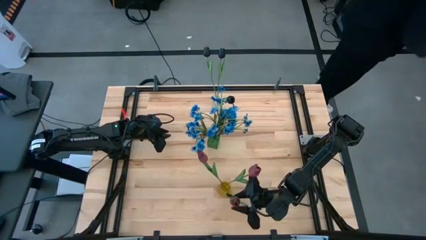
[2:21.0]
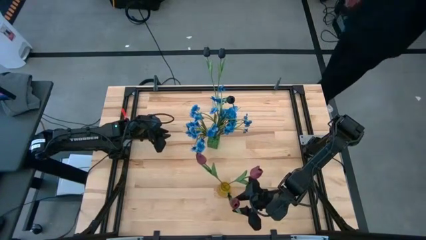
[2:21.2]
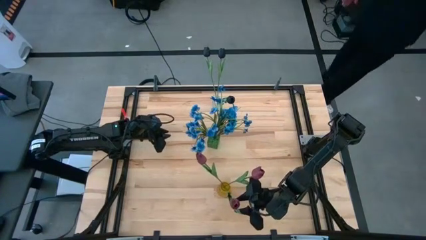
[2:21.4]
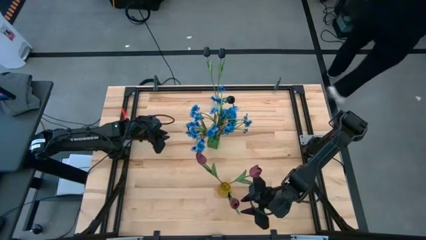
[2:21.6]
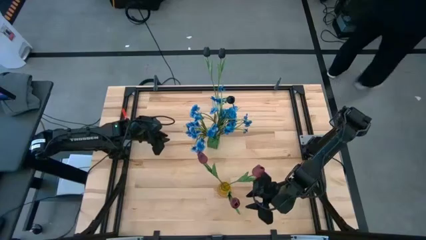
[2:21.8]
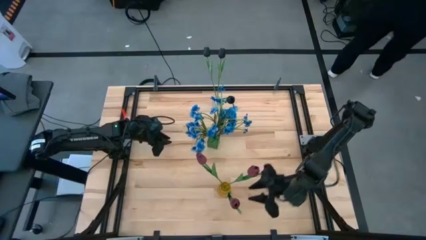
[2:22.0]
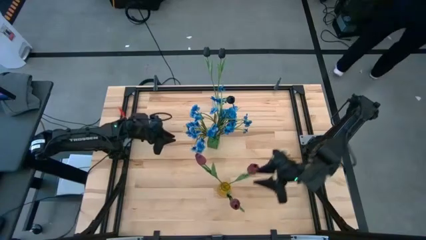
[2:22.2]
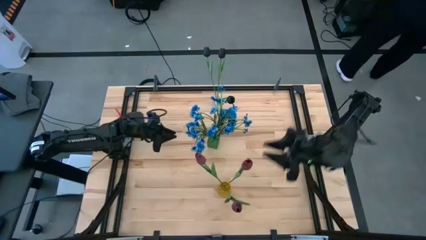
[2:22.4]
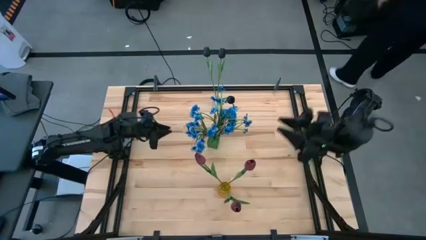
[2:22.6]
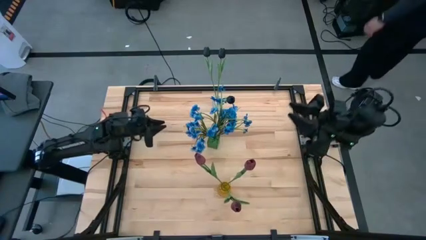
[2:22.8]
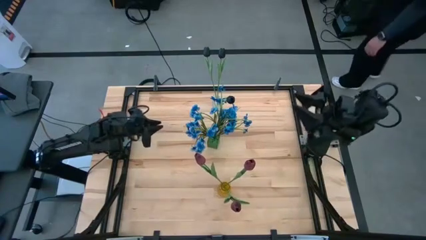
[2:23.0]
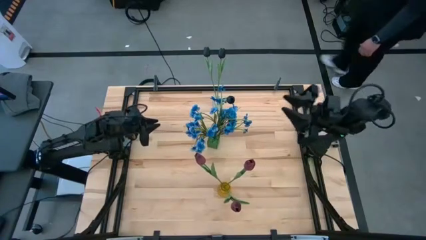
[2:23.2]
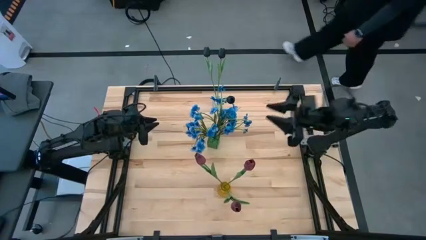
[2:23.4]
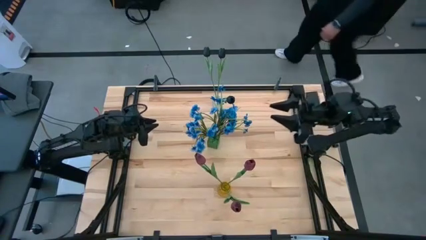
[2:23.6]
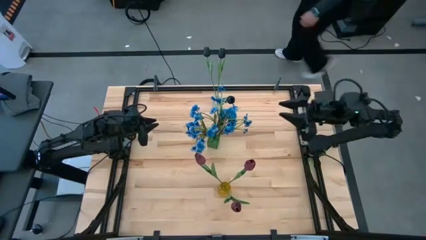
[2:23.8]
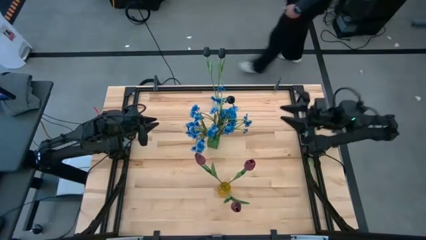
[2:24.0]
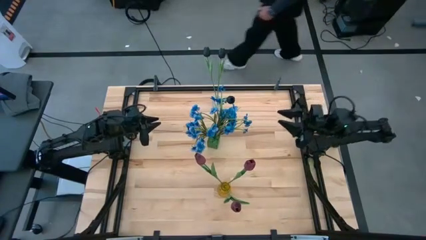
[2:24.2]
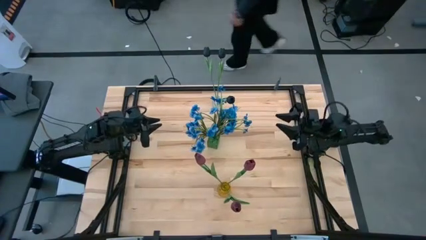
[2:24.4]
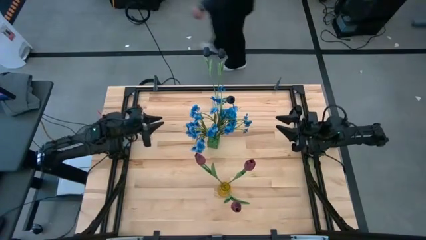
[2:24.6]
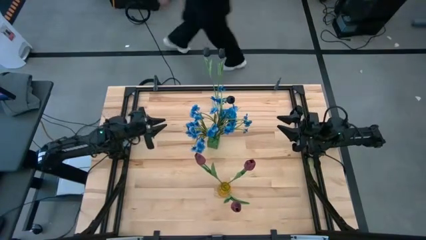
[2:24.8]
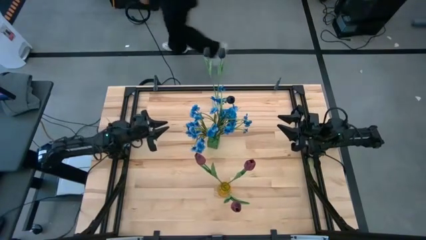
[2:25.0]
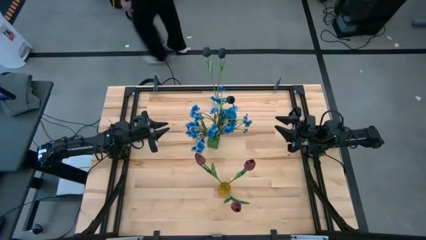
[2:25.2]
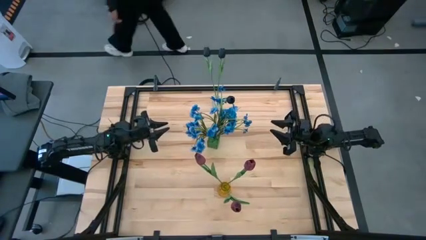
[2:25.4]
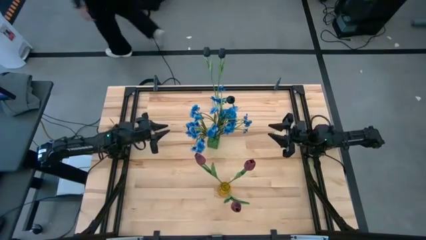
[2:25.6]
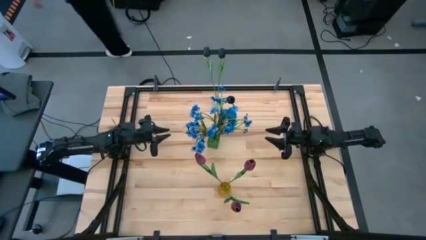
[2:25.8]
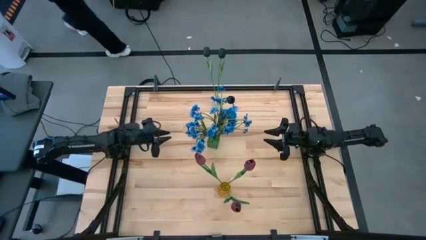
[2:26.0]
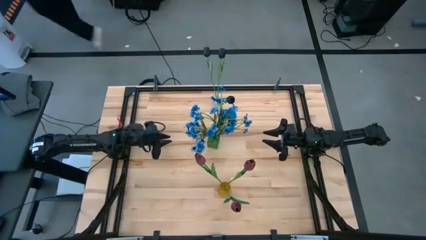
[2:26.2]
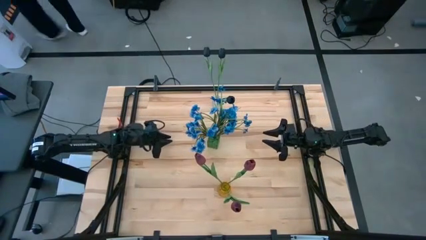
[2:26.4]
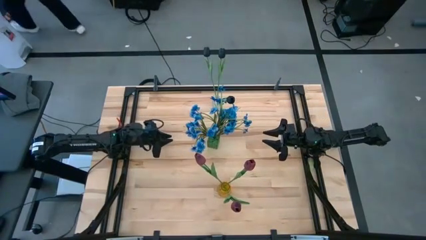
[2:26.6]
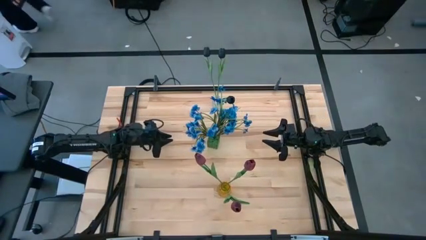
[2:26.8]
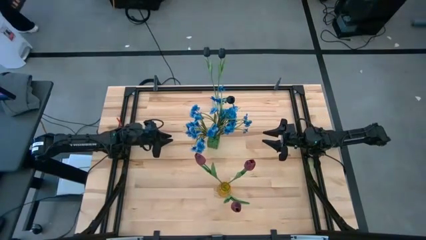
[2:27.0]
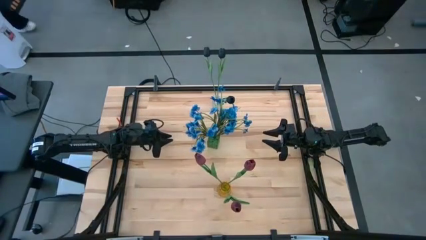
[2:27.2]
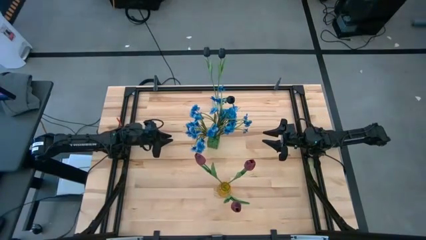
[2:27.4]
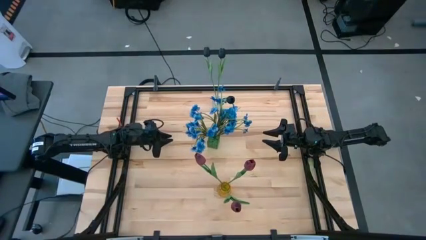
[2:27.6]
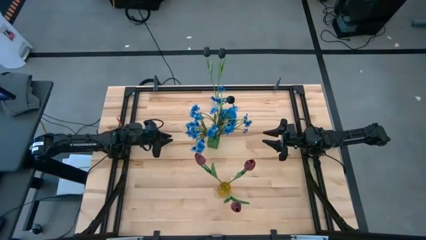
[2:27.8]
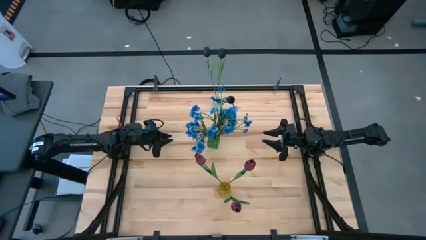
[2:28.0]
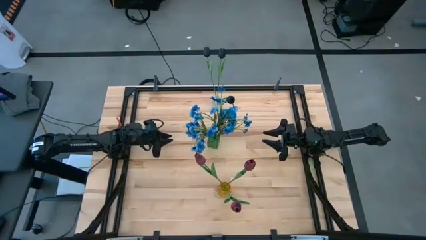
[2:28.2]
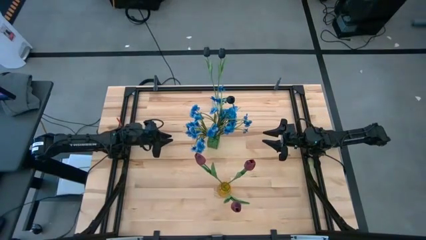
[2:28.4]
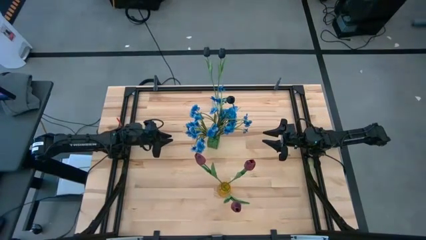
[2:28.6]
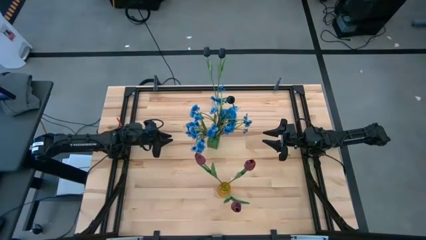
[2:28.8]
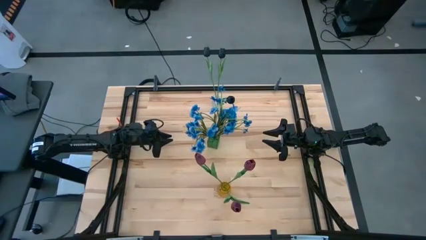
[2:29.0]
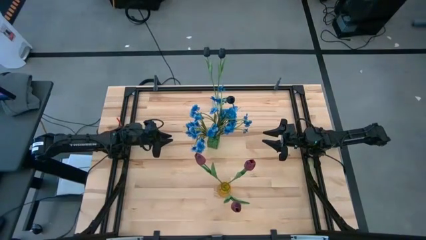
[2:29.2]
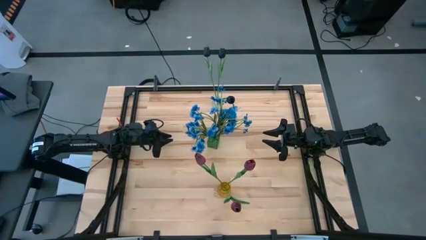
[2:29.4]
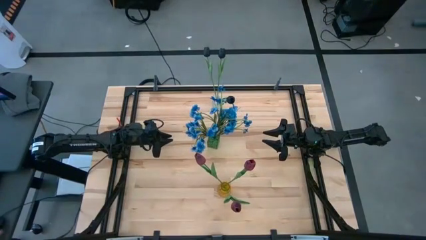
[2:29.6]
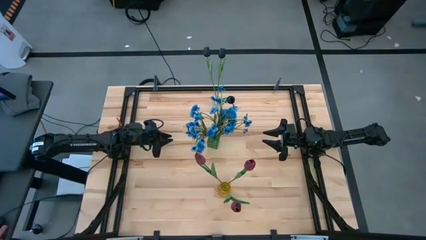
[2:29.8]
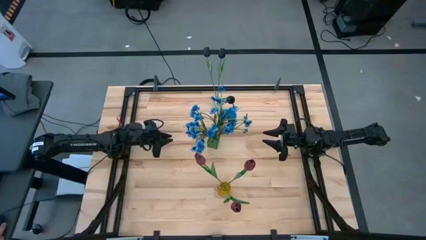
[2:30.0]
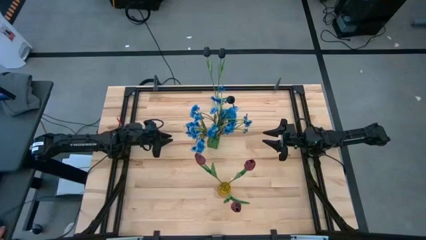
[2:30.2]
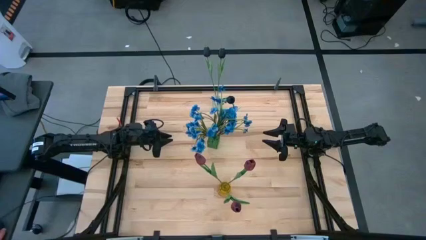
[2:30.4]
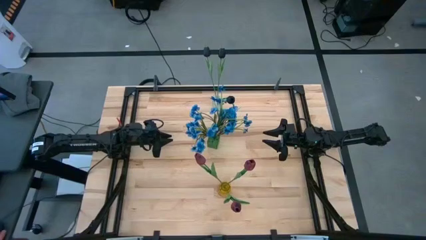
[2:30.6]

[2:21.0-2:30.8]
Task: Sort flowers into vase by color
Return to Home Position
